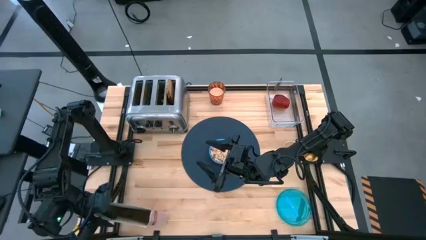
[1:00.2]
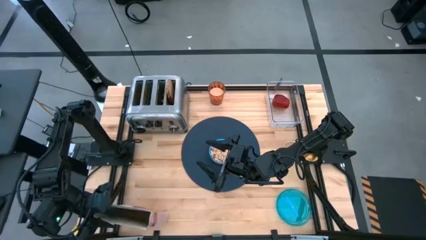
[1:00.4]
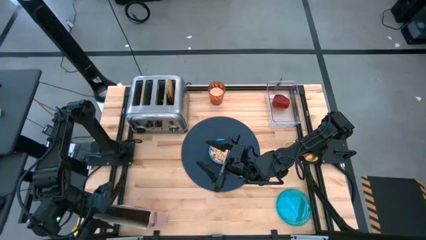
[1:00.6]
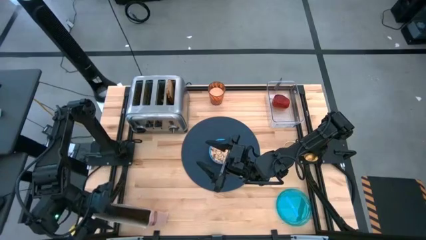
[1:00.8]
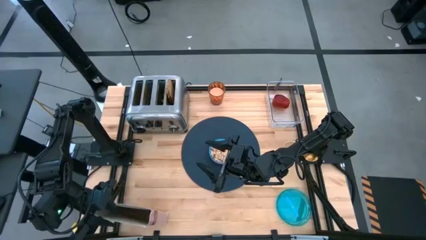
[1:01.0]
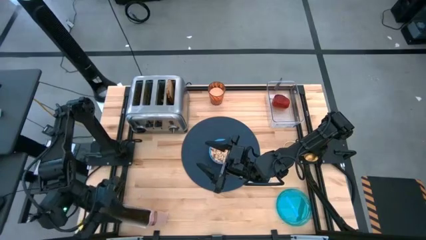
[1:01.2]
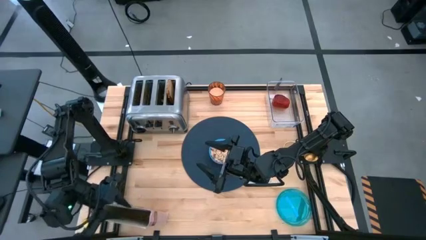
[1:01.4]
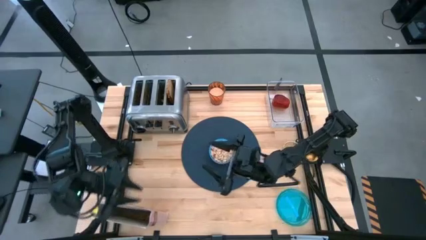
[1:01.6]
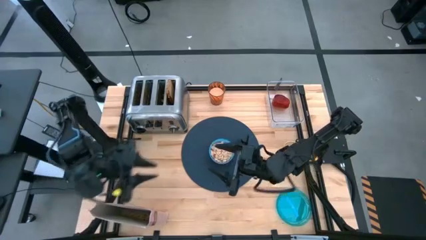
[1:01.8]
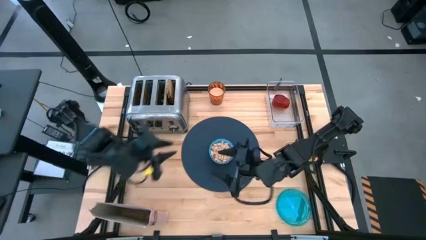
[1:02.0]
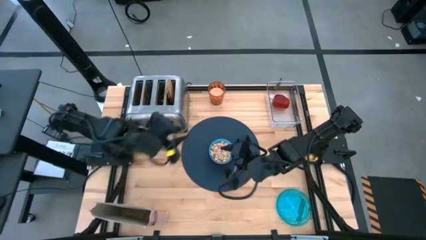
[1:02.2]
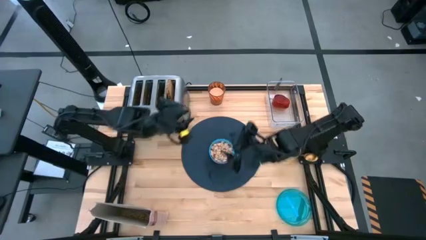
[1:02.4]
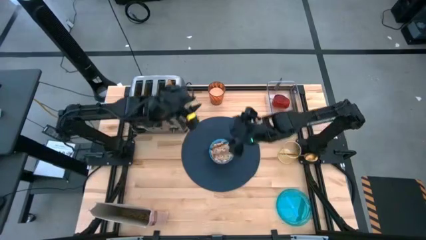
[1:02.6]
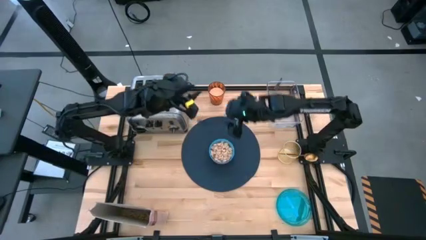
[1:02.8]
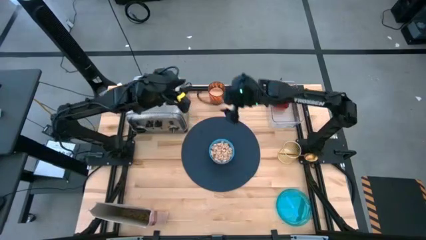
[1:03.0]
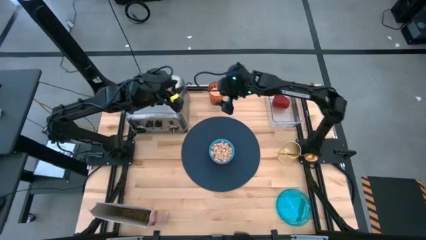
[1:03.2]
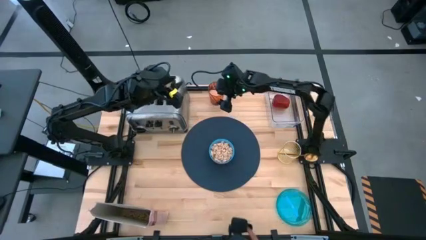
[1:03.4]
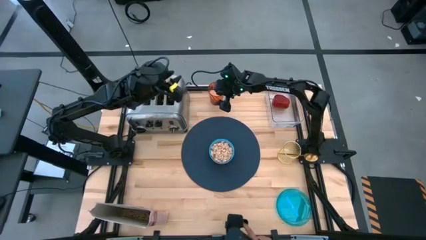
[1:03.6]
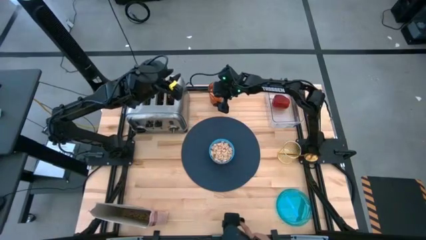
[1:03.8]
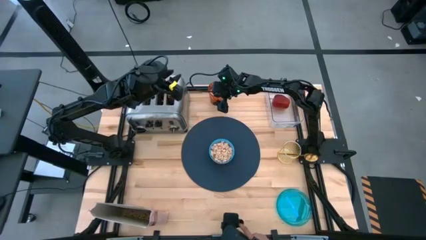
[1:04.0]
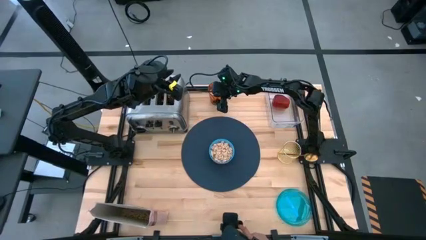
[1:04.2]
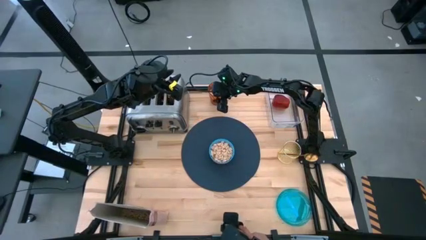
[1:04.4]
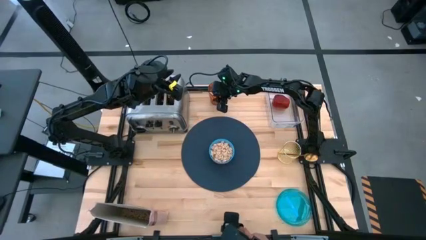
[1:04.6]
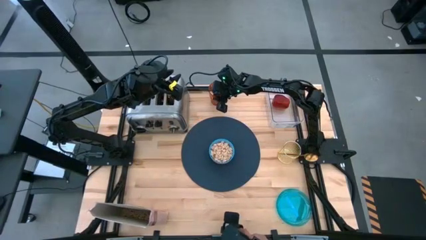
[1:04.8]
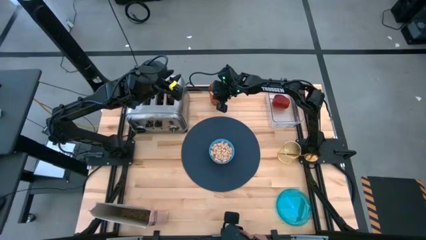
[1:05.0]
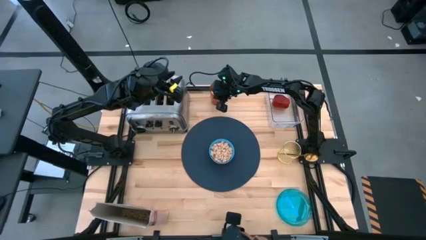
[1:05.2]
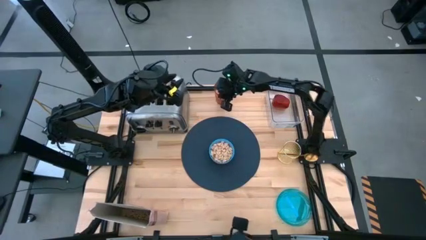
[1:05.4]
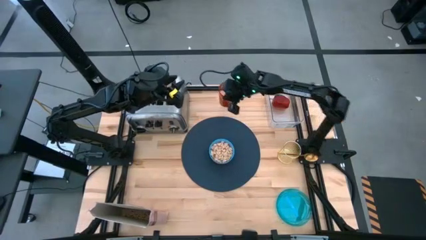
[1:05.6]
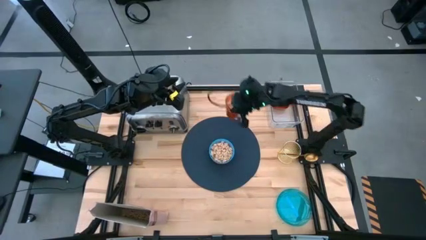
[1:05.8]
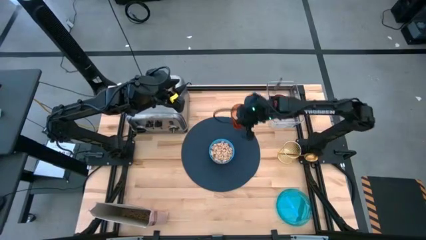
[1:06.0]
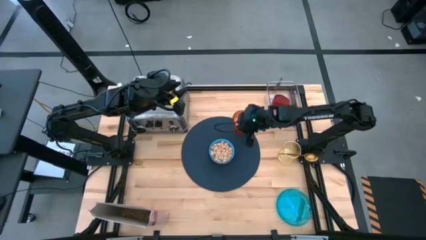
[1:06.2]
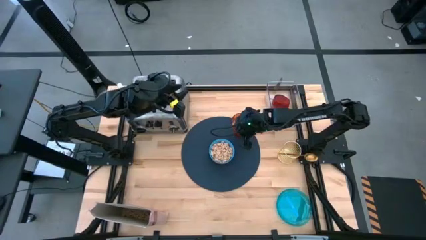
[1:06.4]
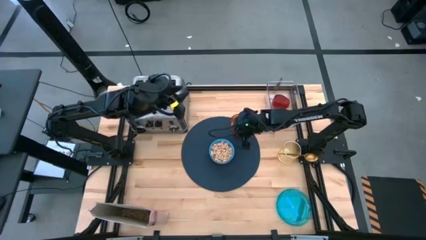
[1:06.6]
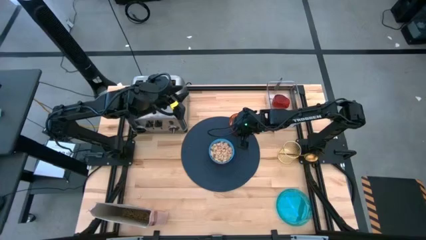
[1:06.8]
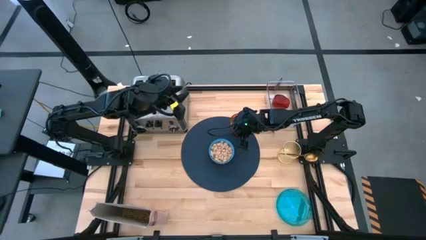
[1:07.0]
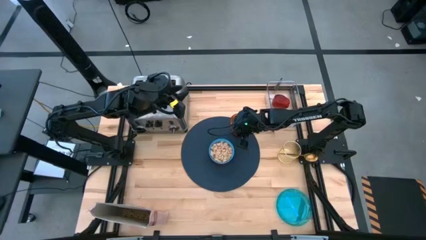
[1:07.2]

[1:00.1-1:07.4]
Task: Arrange a breakfast setting
Put the orange cup of milk on the blue table mat to the top right of the blue bowl

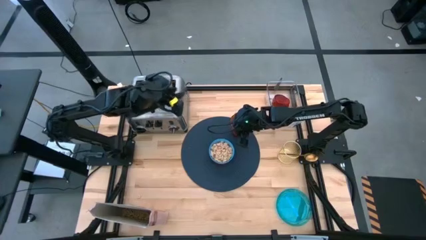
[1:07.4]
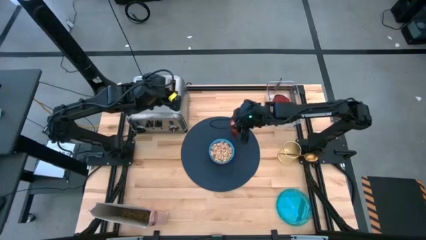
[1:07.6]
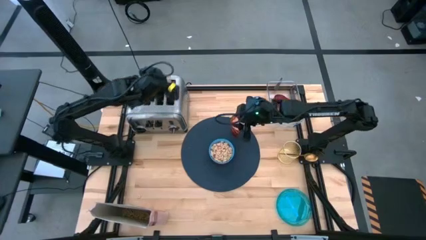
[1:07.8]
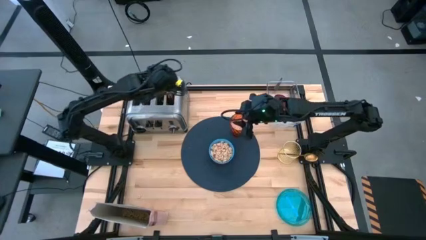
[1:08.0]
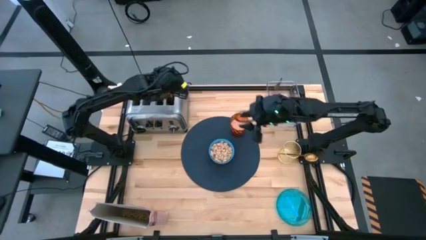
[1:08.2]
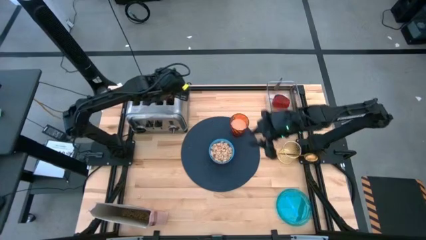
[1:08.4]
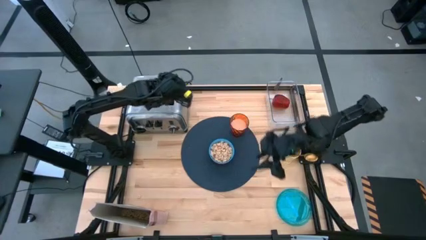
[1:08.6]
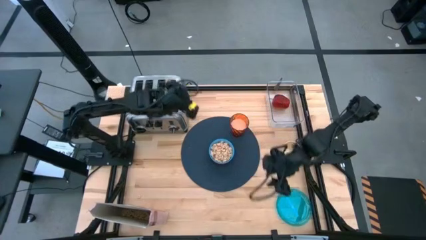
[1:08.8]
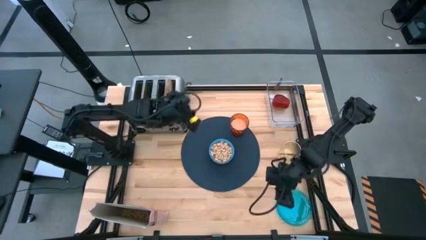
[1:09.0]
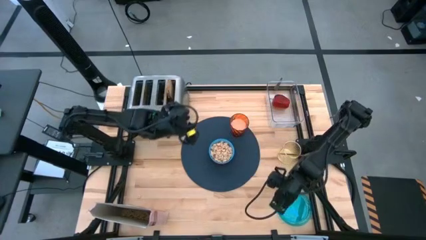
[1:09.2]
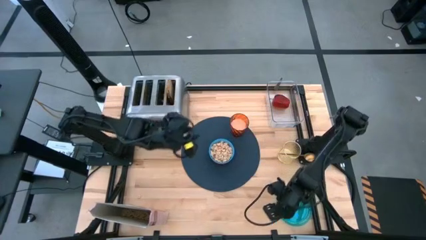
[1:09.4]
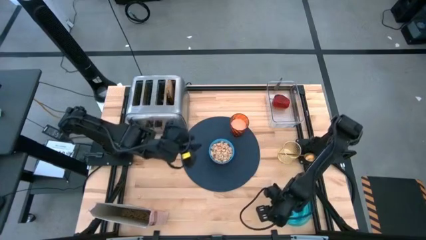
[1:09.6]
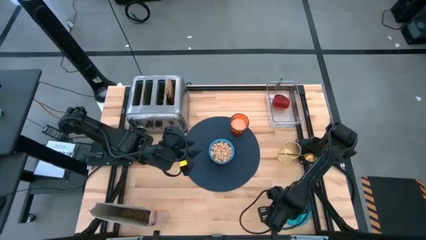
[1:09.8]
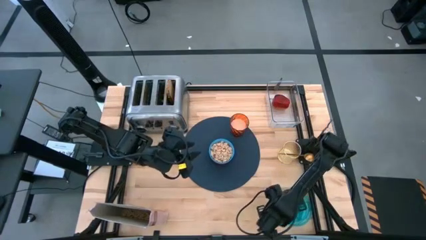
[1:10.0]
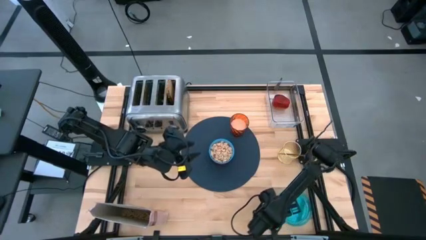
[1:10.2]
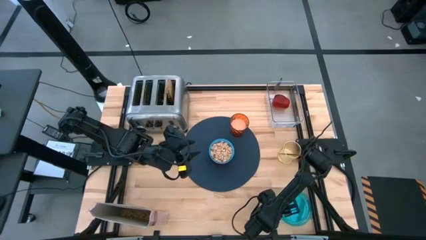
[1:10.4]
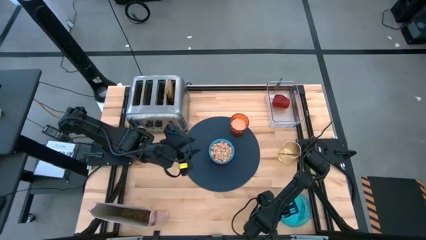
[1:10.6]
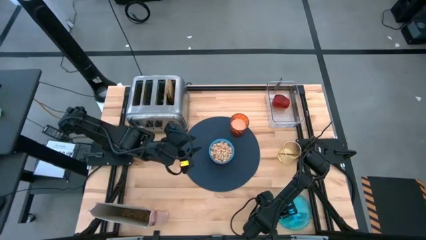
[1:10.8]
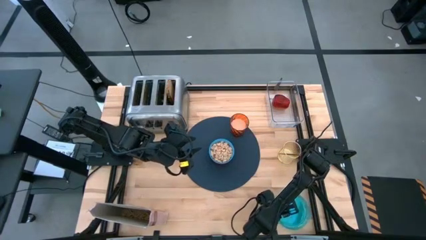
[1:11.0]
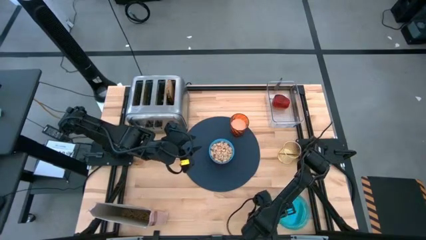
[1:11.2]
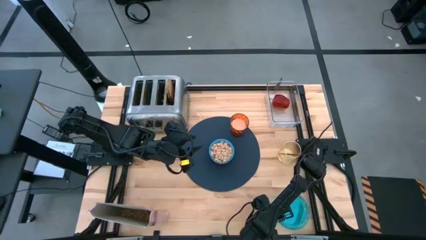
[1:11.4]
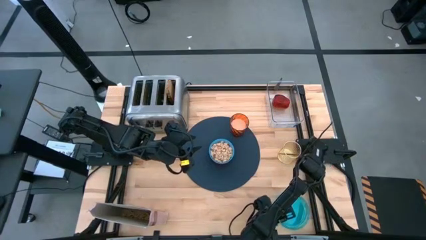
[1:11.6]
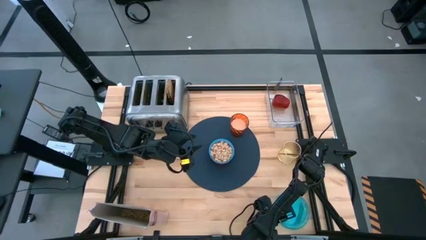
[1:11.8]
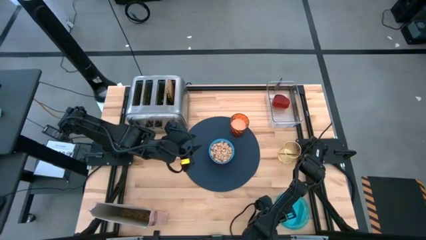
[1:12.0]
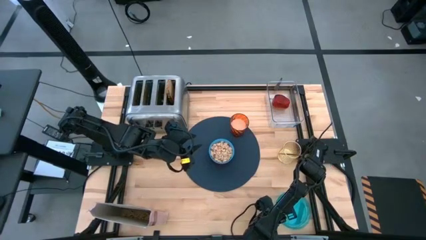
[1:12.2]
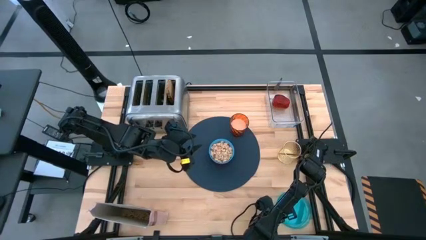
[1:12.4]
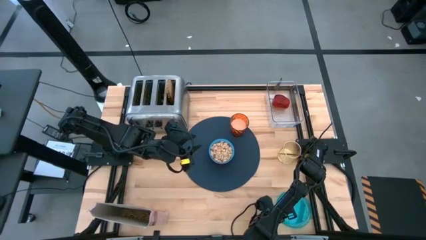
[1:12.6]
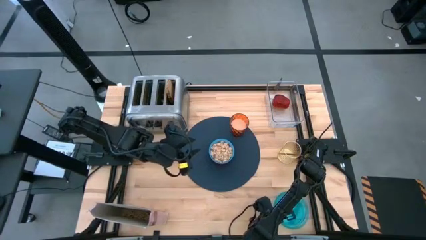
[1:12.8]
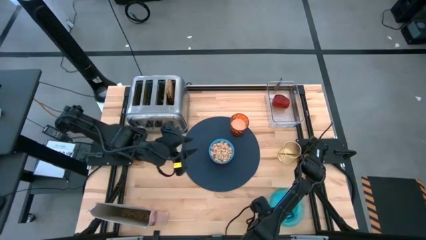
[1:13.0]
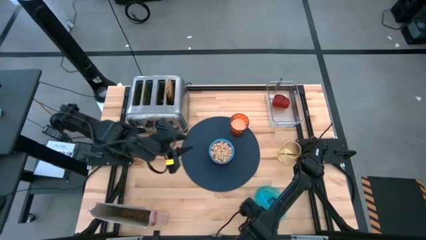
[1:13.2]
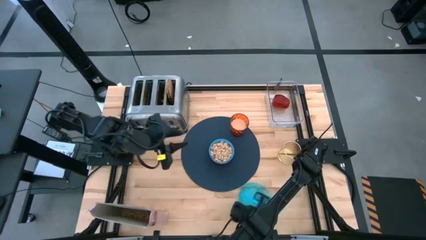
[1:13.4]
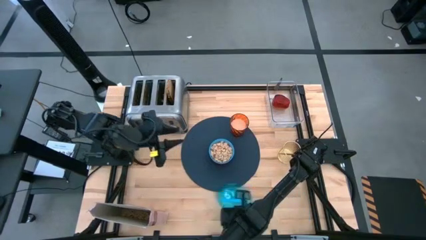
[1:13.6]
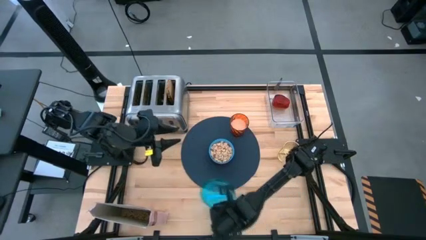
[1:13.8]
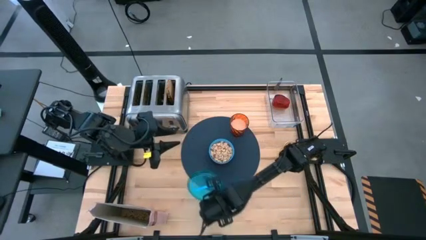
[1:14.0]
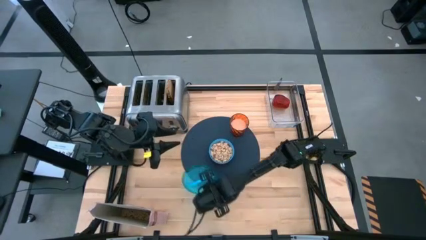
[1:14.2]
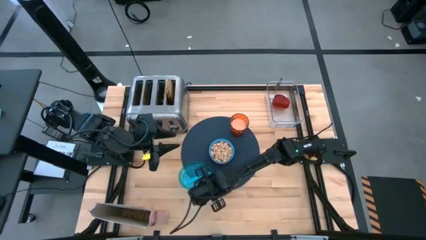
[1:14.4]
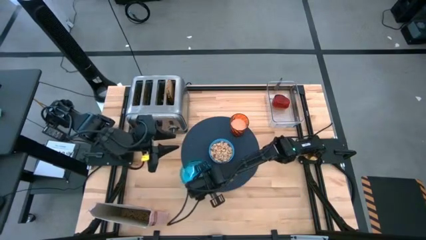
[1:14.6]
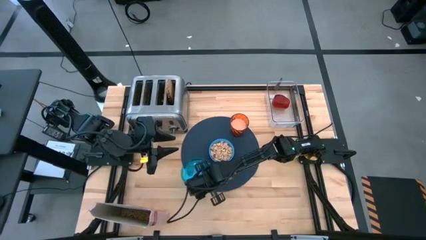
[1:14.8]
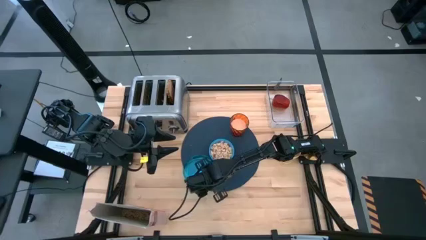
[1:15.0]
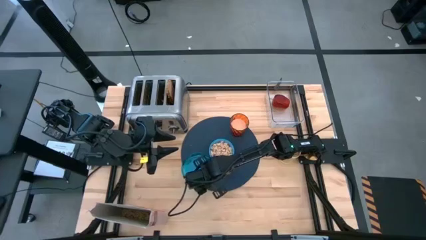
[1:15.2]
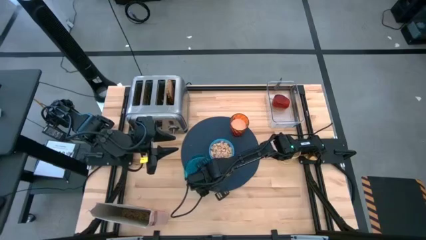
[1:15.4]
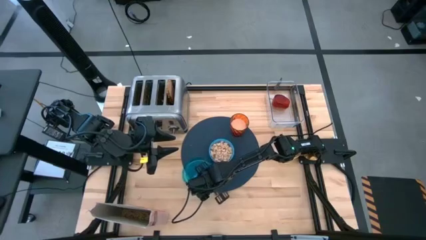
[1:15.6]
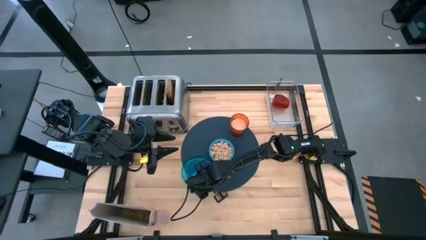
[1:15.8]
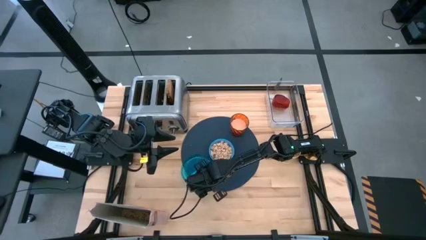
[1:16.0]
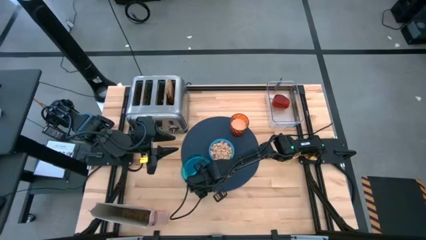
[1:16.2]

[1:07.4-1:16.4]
Put the blue plate on the blue table mat to the bottom left of the blue bowl
